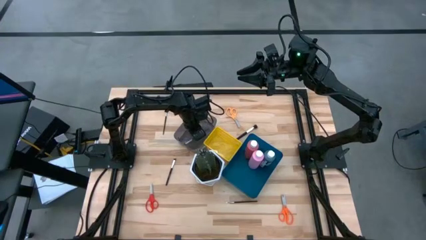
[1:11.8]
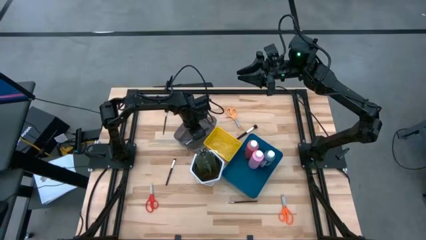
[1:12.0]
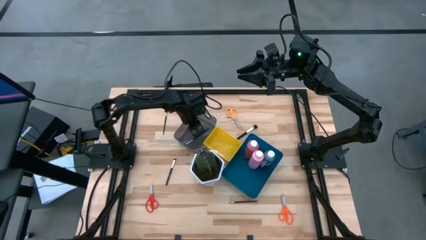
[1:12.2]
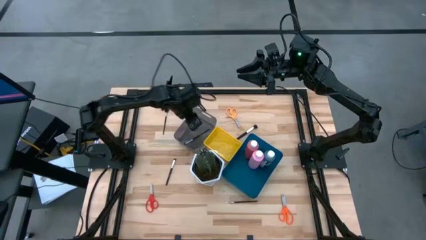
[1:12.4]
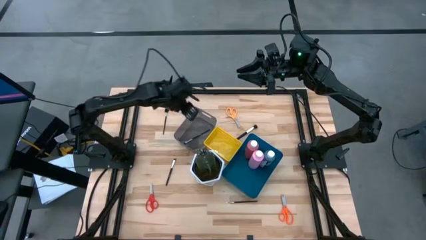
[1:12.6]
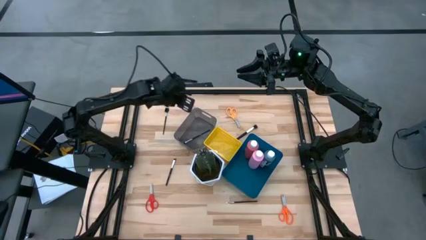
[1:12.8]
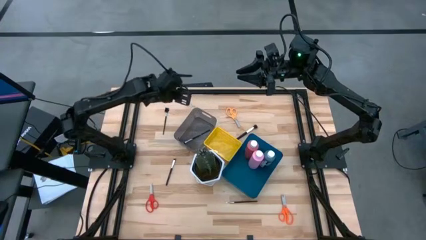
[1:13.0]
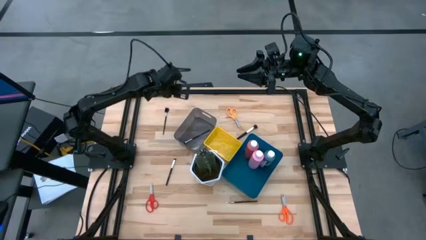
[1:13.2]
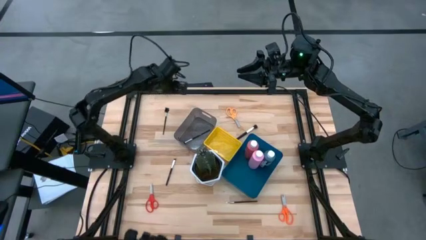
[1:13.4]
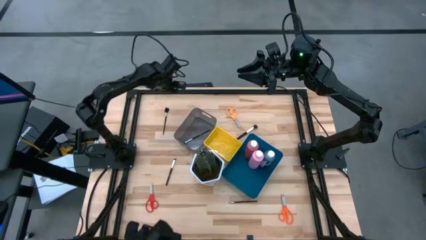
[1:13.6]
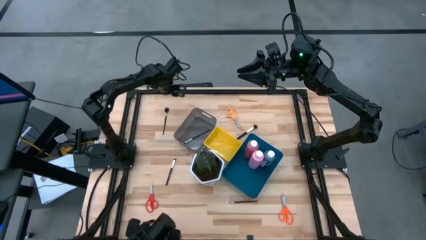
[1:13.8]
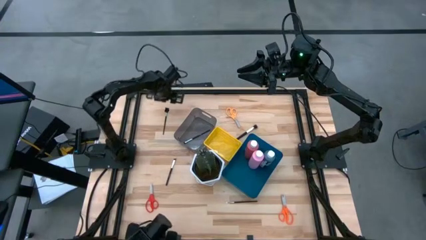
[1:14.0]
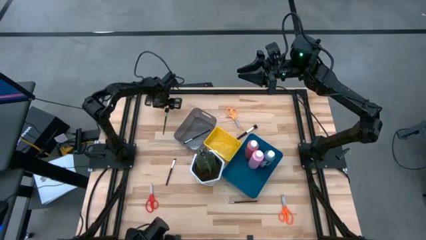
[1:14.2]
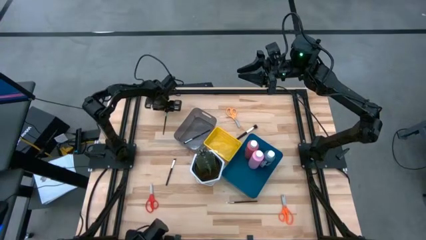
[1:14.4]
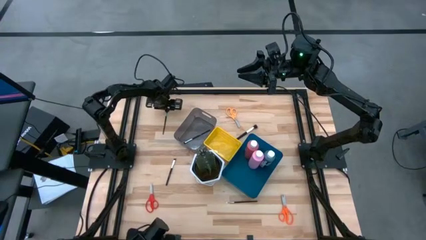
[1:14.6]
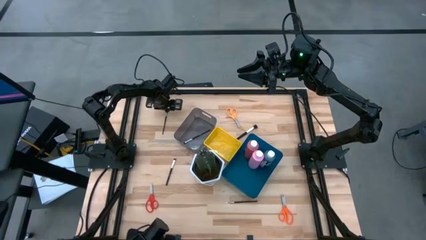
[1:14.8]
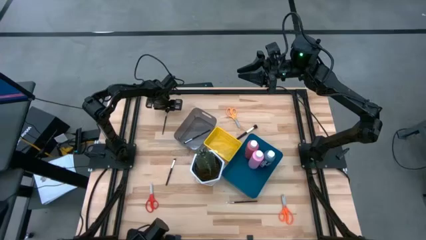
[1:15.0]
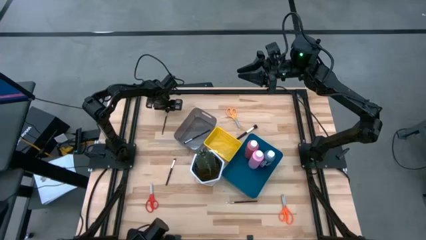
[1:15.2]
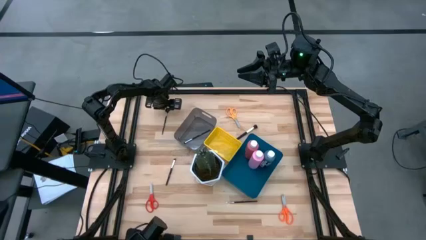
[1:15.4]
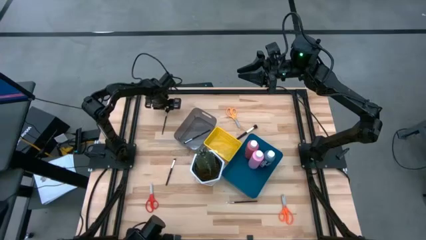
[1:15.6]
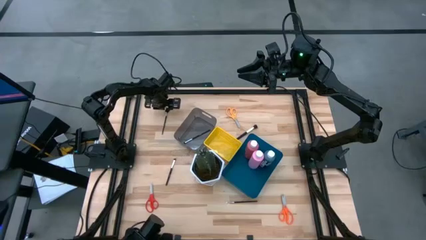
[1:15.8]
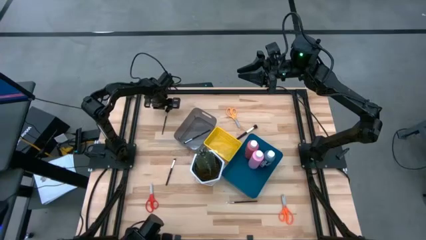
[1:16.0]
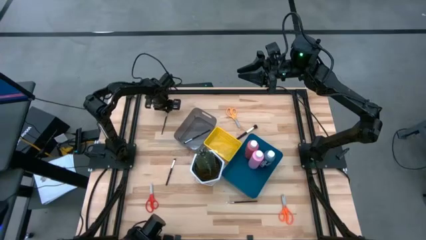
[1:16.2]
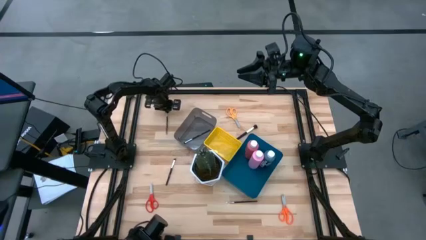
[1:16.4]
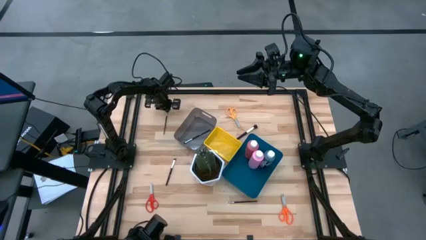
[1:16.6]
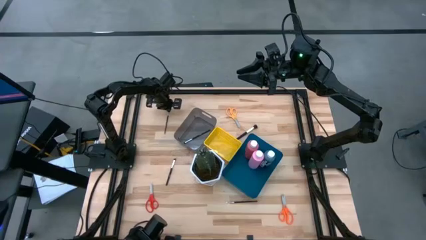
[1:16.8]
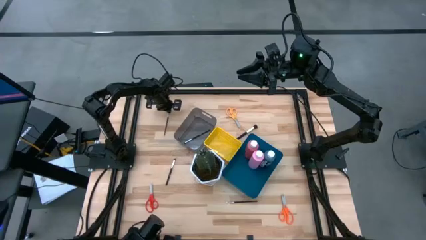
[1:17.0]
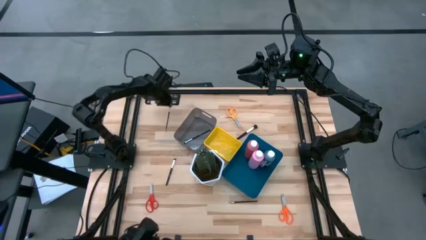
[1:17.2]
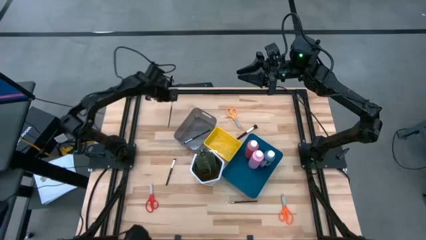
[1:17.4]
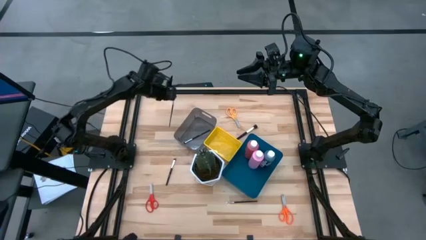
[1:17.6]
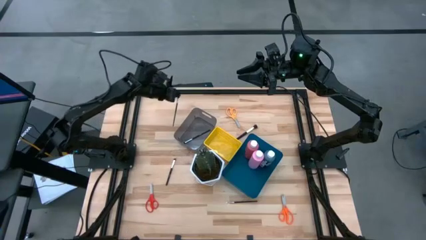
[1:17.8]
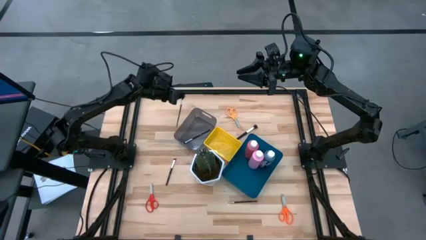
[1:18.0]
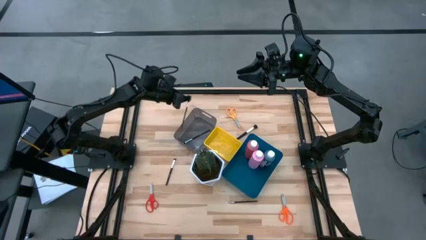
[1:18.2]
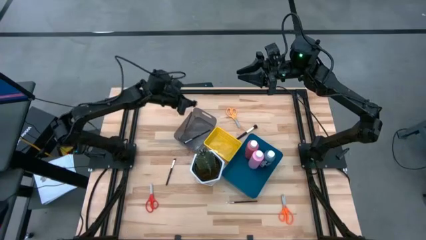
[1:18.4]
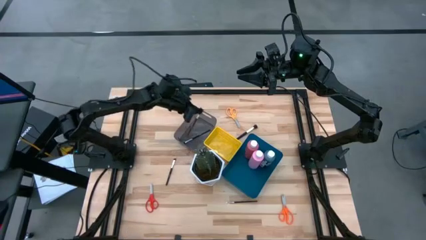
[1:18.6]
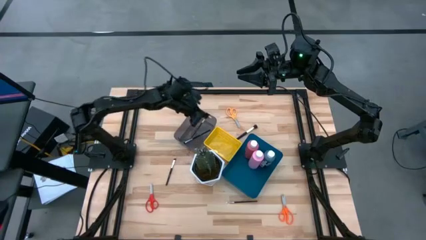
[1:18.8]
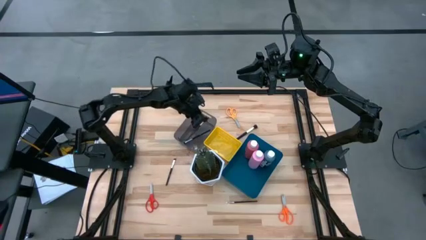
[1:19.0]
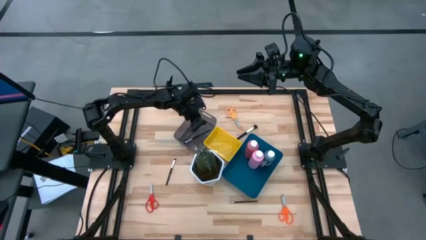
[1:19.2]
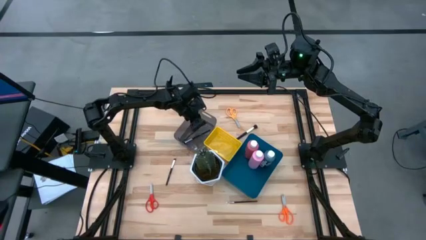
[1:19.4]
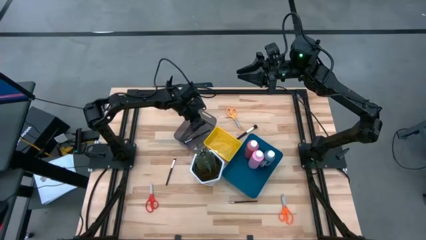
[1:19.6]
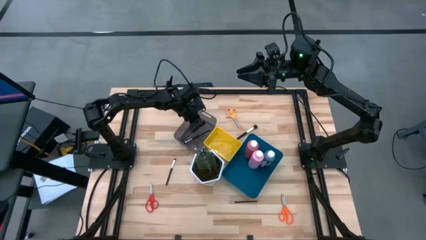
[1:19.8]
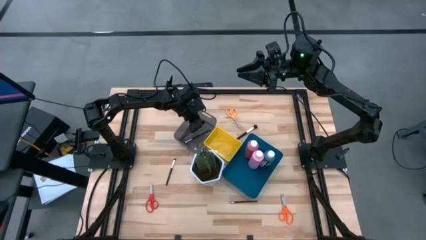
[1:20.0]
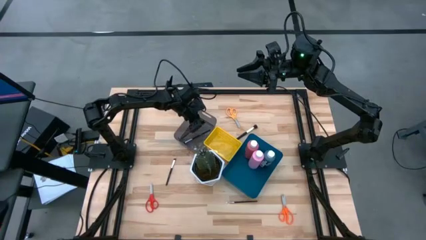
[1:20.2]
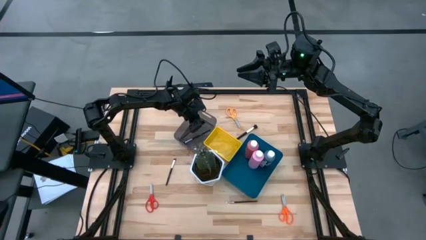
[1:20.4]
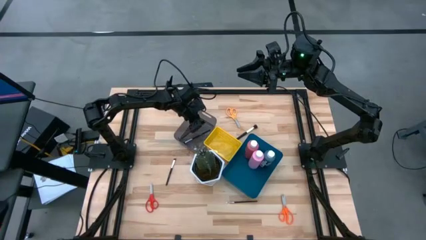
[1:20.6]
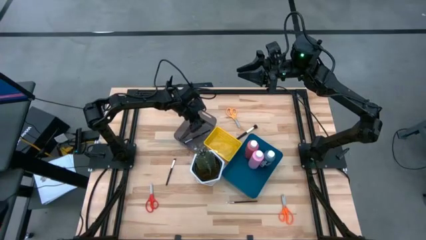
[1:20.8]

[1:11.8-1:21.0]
Task: Pick & Place Paint Supplies
Put the makeup brush into the black bin

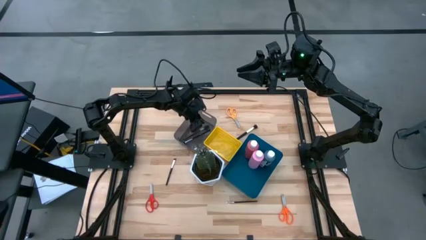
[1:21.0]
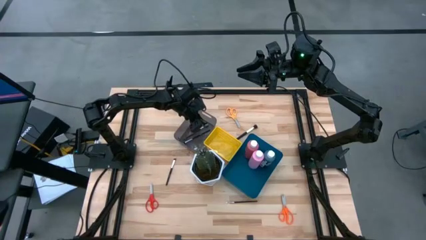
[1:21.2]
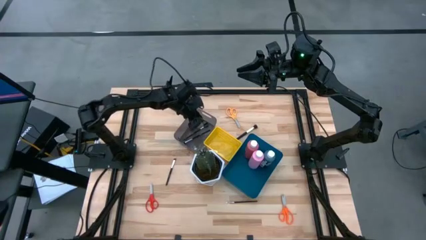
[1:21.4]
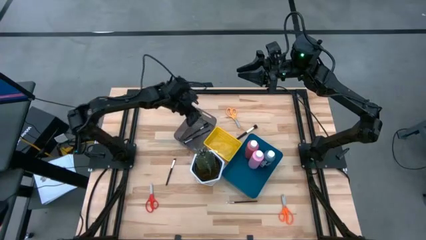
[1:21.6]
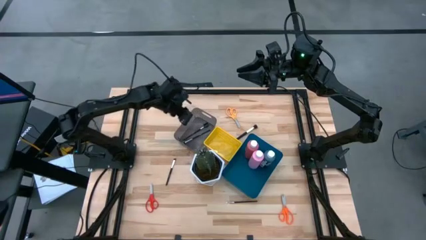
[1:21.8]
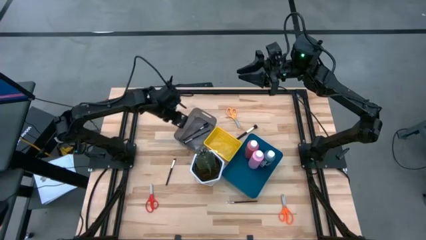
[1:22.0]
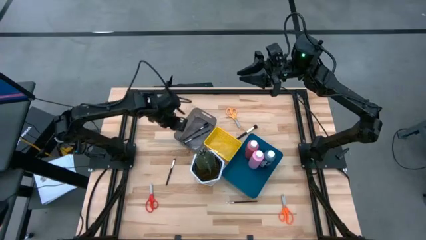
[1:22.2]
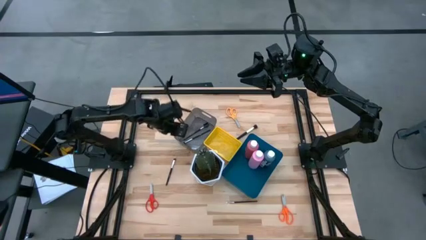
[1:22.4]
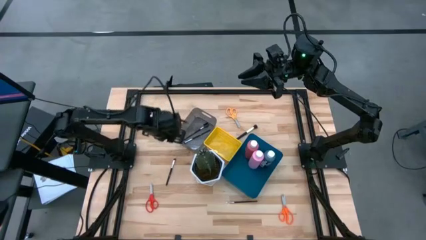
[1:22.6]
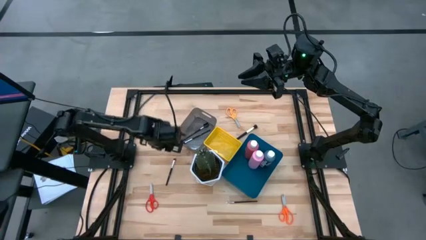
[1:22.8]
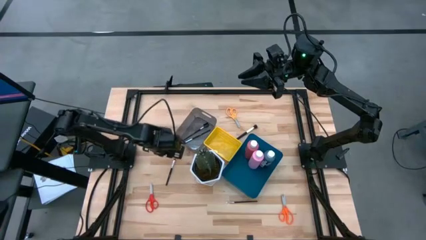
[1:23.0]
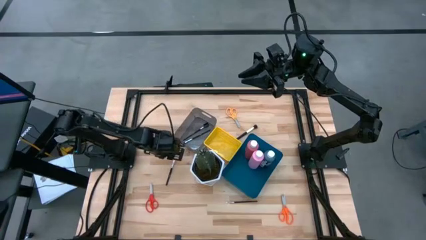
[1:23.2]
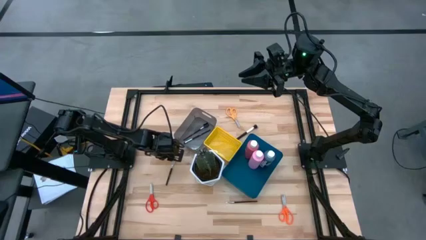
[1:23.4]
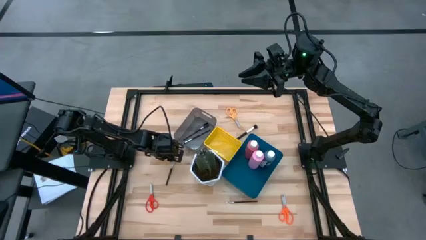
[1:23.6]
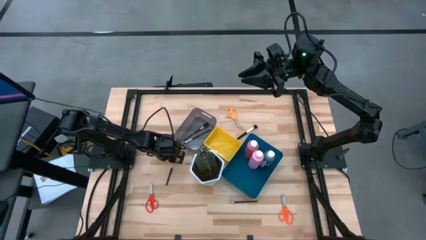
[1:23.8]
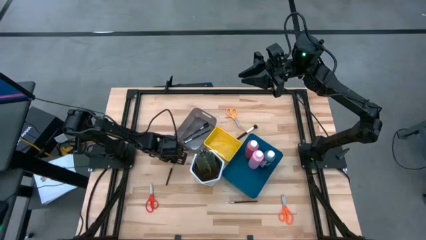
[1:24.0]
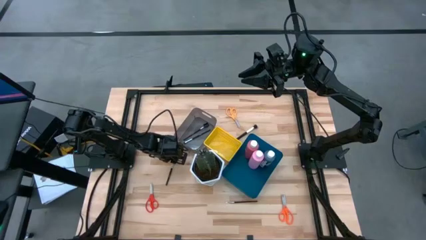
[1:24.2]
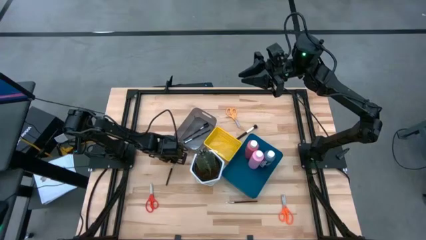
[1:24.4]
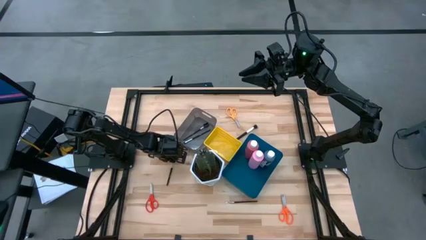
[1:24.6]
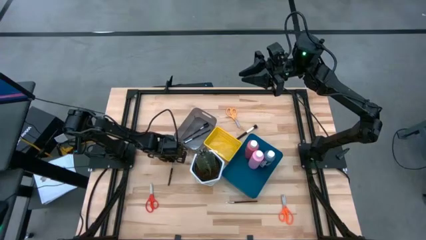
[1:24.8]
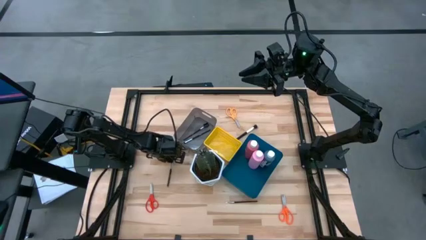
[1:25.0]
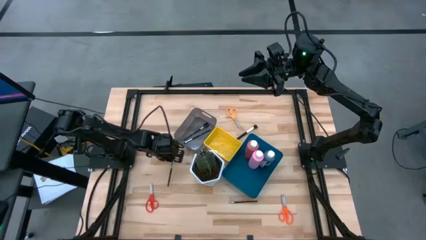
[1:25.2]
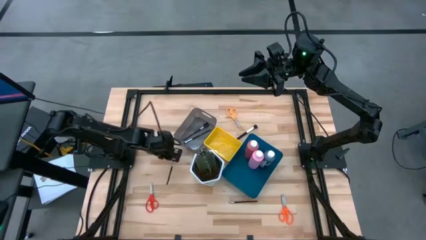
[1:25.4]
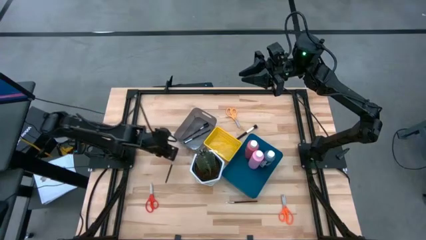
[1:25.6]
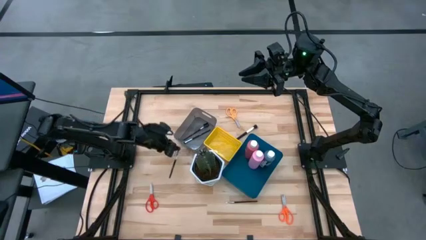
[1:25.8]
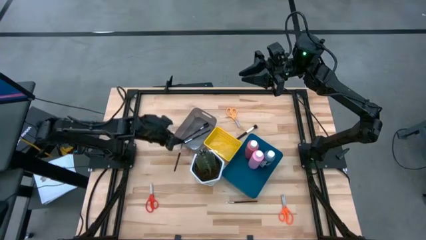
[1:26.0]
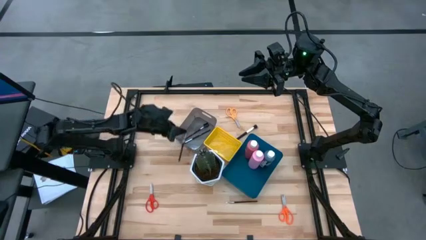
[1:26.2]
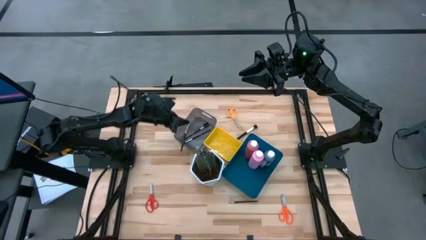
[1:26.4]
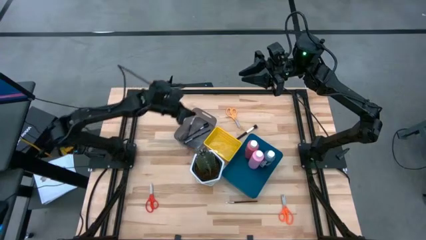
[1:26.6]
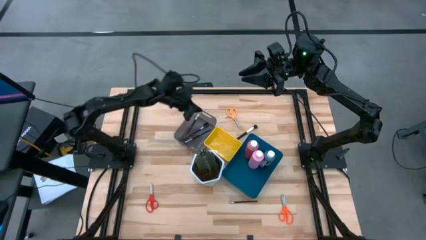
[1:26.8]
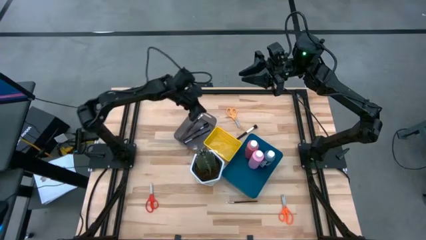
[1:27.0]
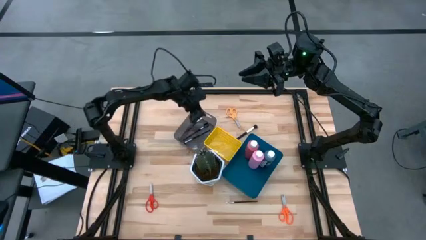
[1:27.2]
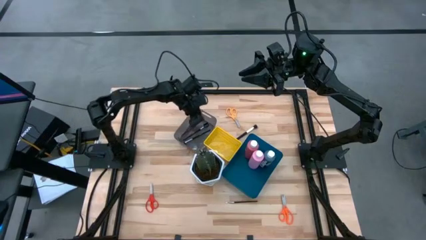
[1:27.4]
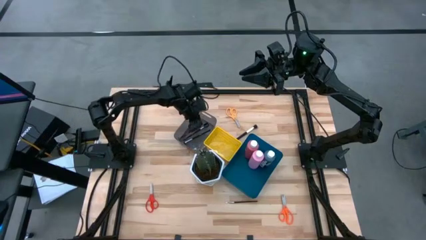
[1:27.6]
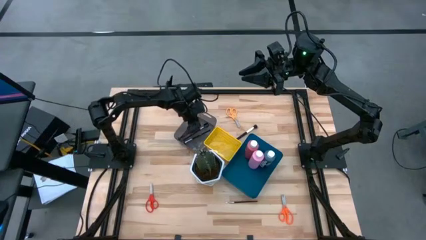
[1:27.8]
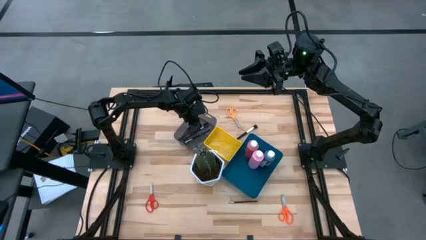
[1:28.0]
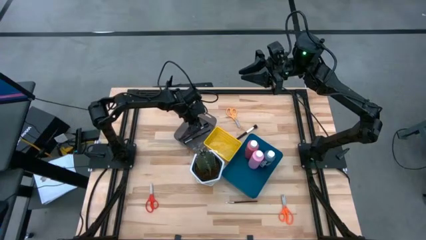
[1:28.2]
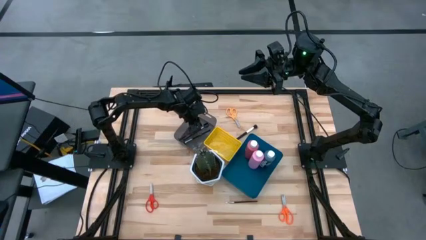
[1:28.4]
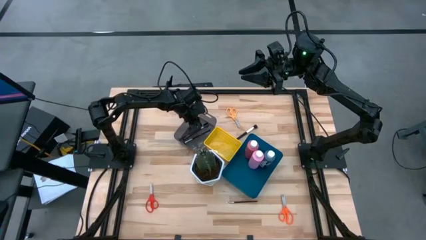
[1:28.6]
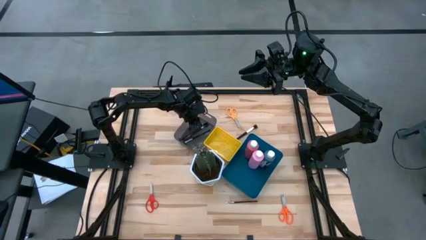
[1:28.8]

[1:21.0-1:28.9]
Put the left makeup brush into the black bin
